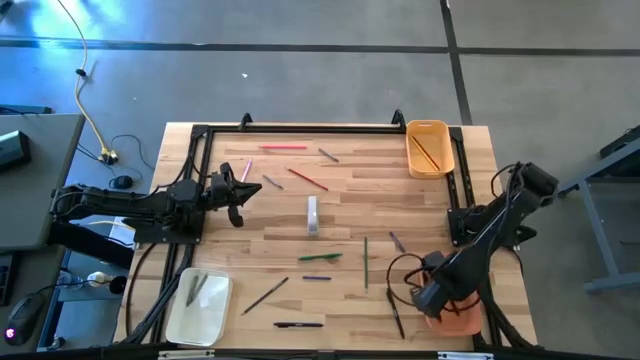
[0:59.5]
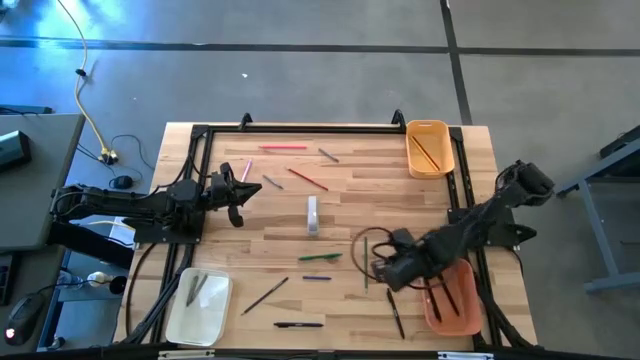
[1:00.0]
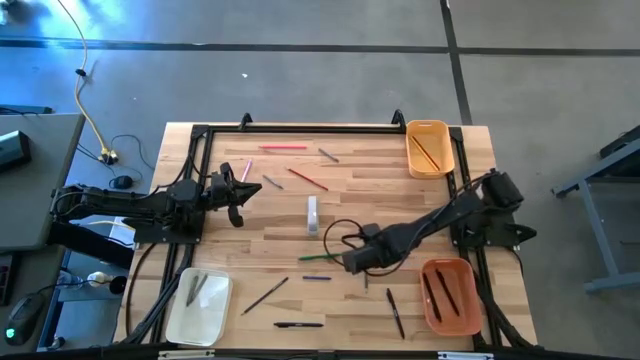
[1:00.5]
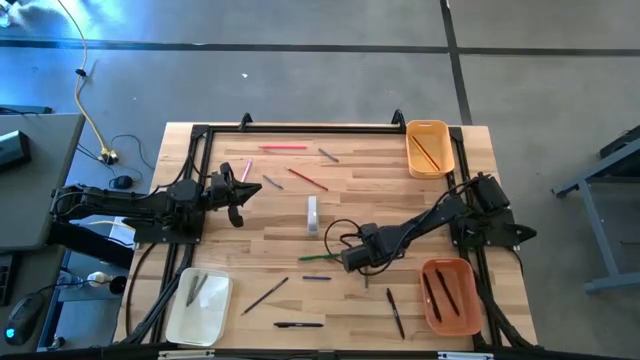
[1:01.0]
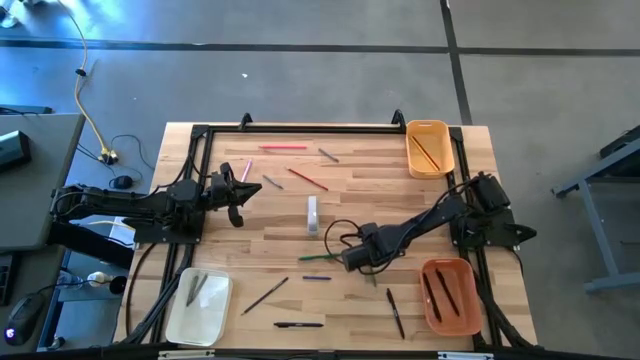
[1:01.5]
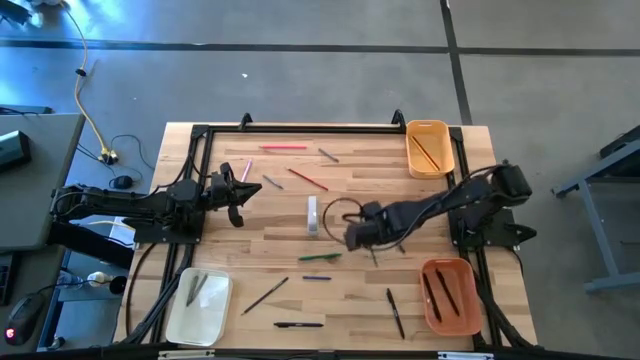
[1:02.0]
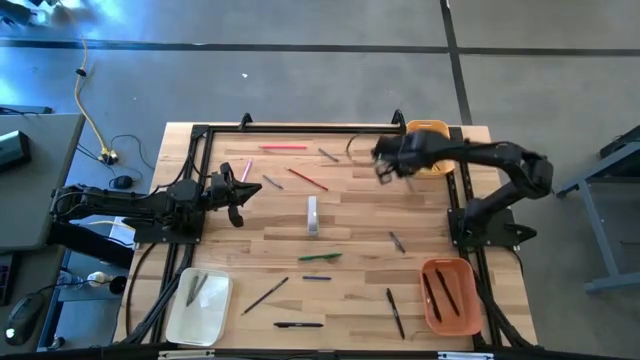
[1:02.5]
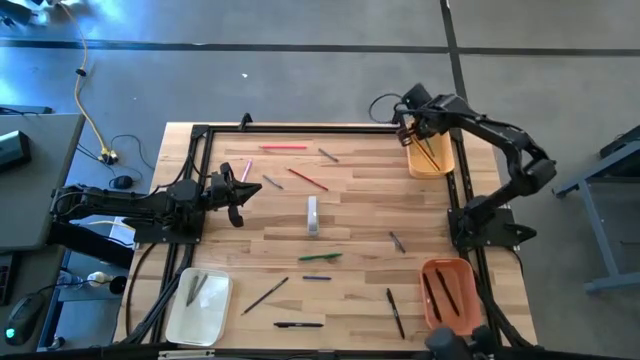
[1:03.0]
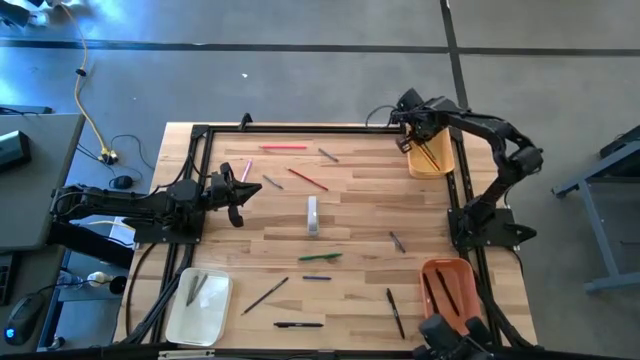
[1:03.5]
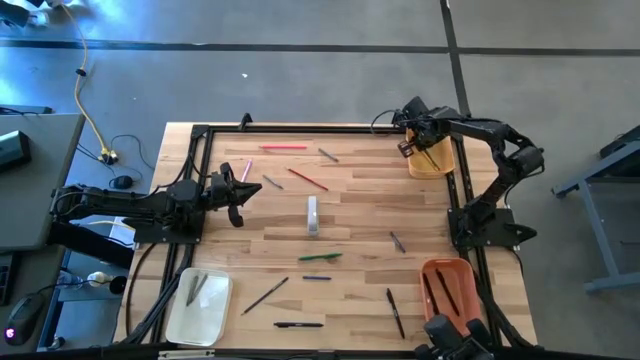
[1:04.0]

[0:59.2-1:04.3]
Task: Sort crayons/erasers/pens/pencils in bins
Put the green pencil into the yellow bin

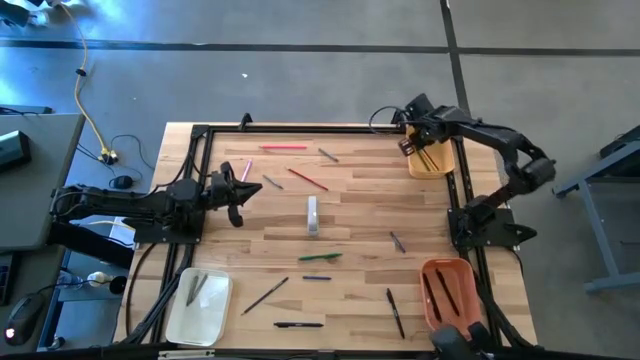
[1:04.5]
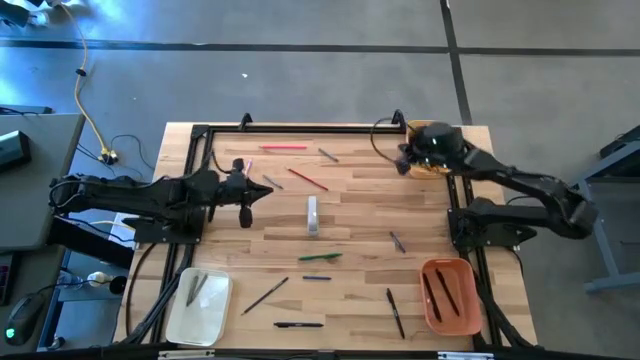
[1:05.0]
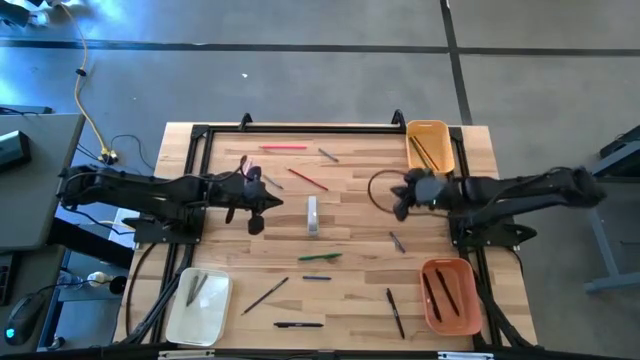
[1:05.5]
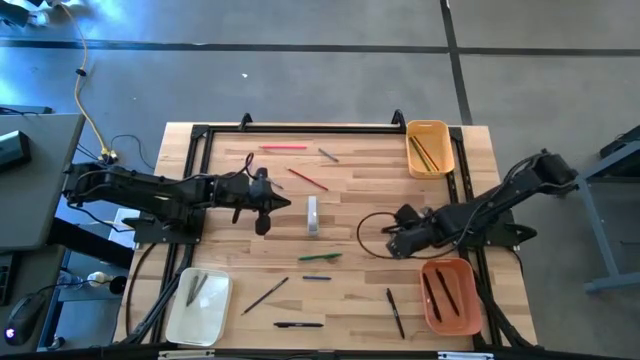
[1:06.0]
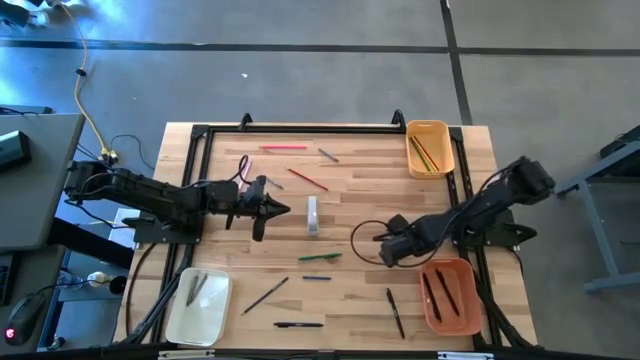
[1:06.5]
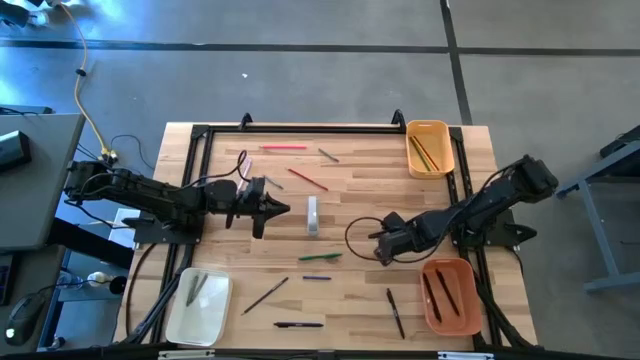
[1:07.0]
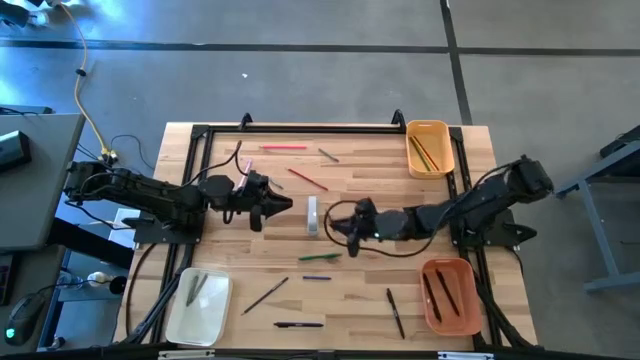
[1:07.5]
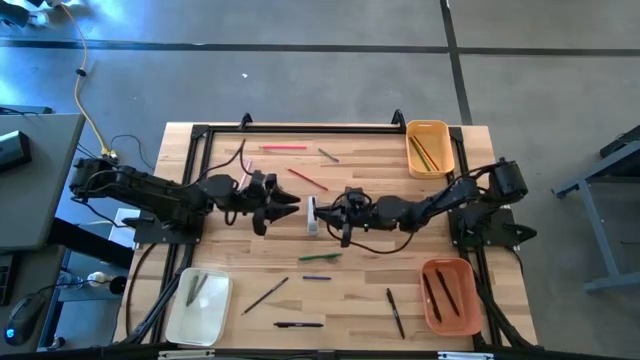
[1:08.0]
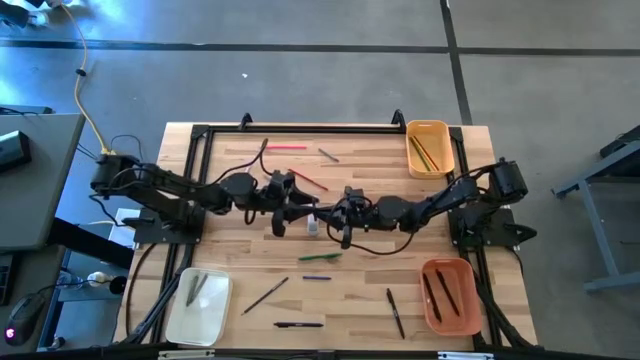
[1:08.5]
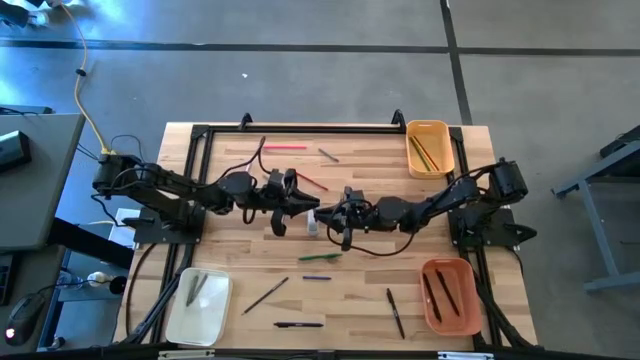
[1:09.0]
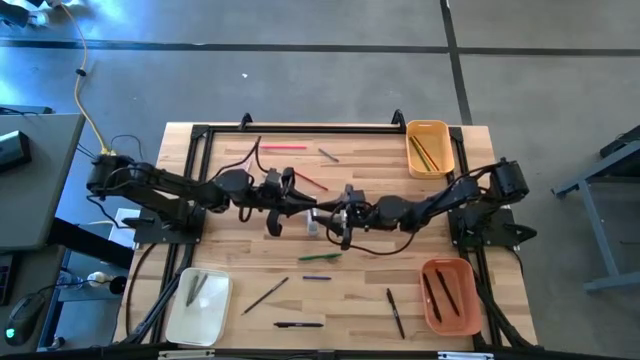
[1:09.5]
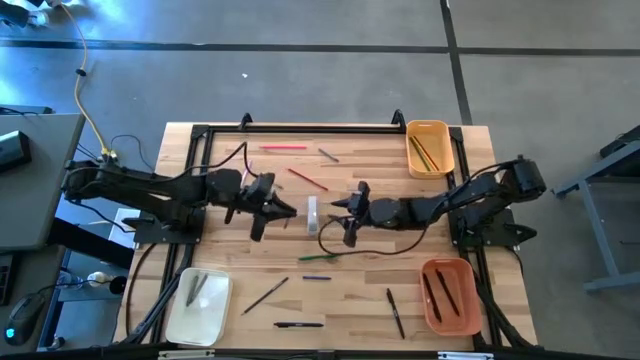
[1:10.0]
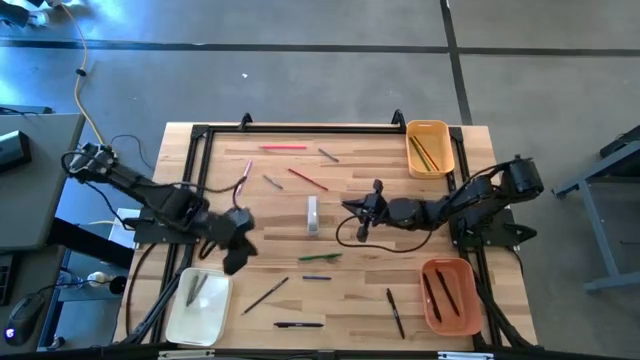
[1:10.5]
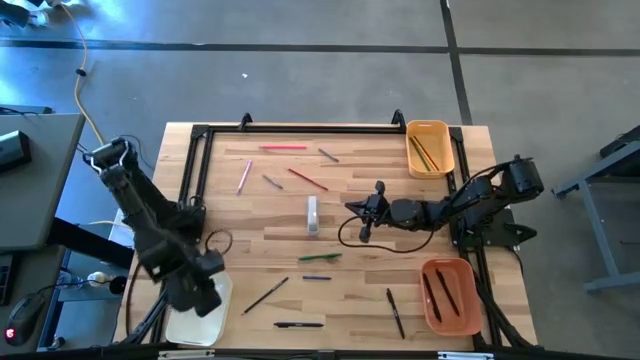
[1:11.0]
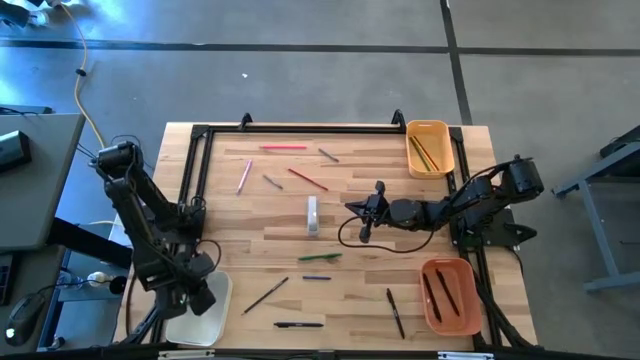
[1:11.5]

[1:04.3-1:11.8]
Put the blue crayon into the white bin

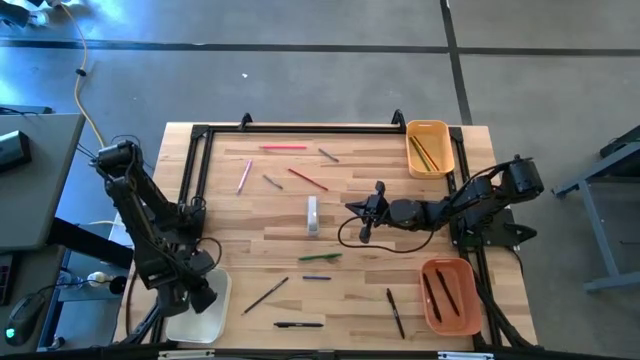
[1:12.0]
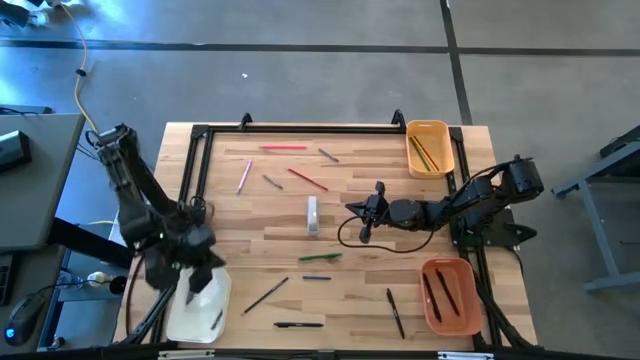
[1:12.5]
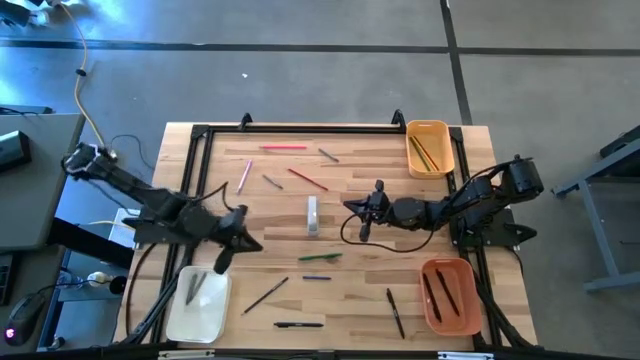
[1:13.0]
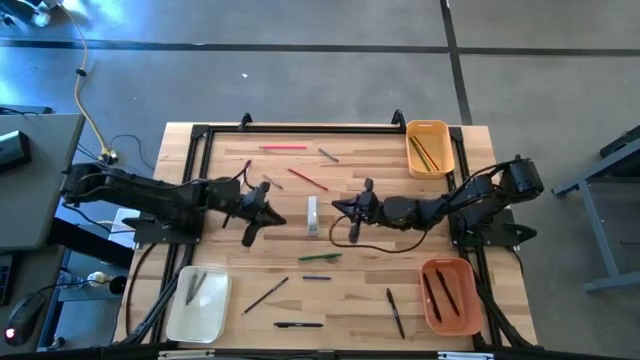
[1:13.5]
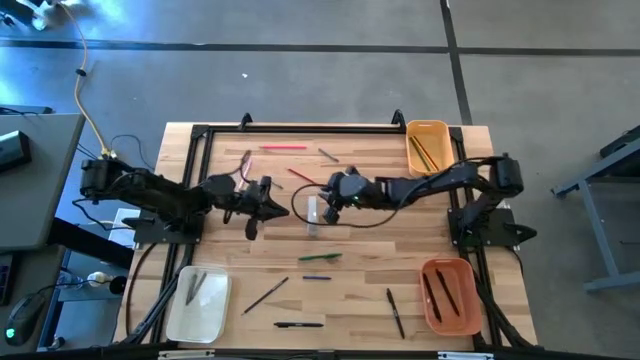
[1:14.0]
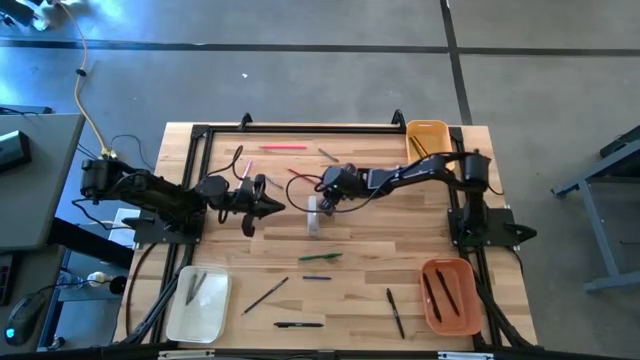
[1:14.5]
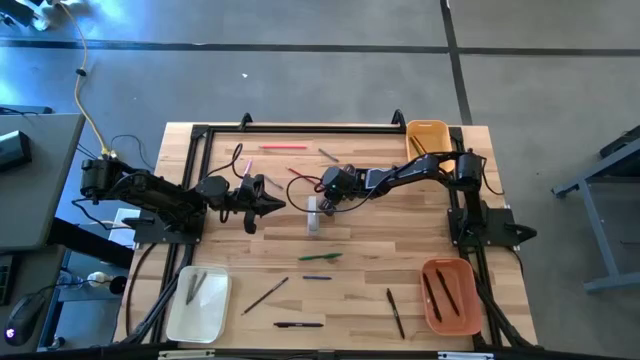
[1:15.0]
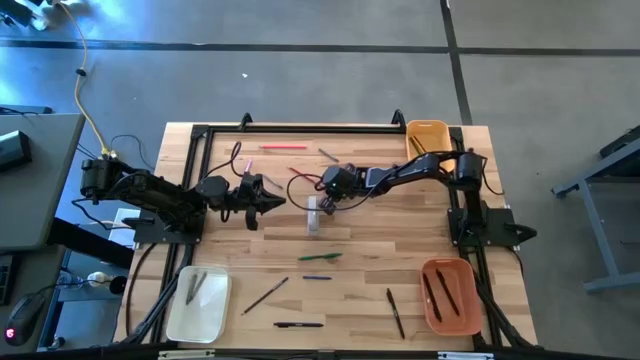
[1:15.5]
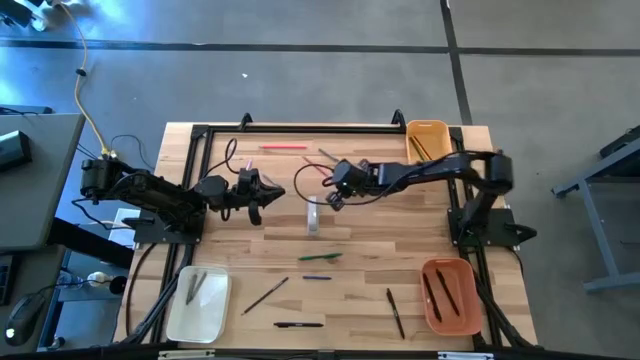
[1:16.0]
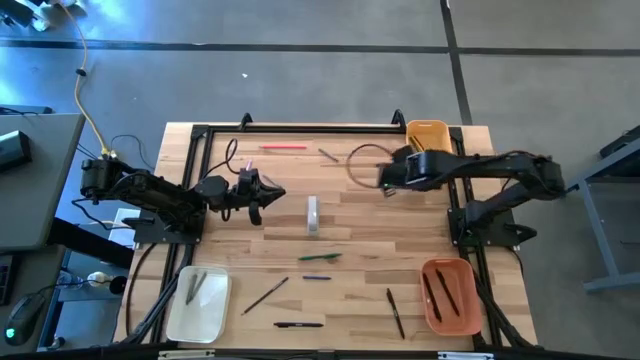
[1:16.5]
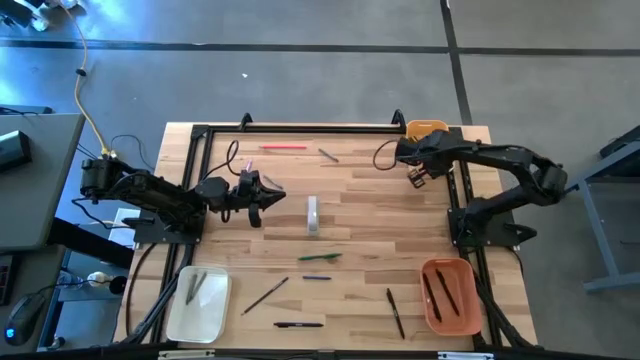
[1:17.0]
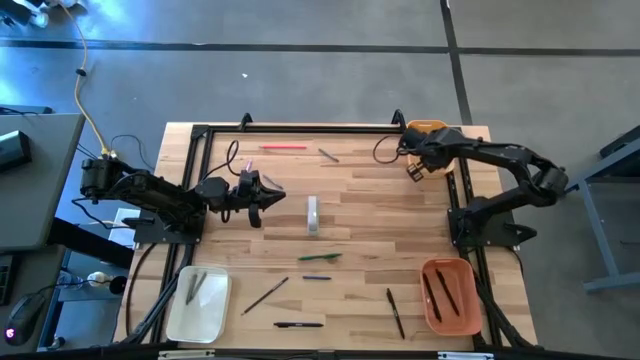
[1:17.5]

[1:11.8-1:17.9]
Put the red pencil into the yellow bin

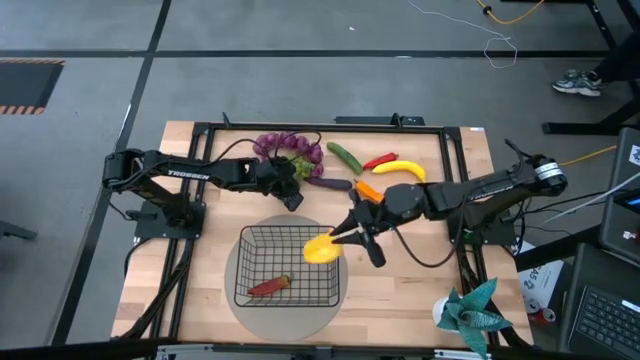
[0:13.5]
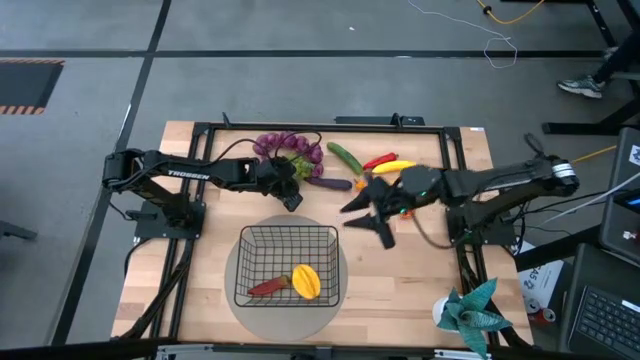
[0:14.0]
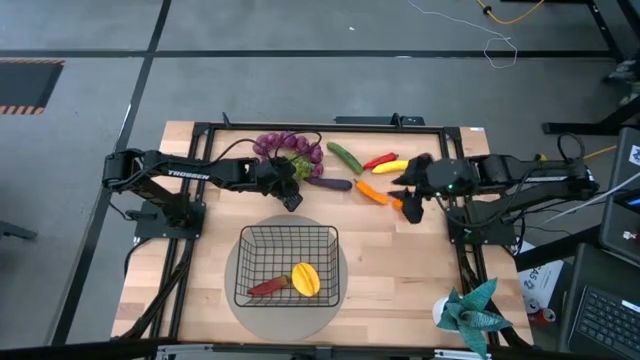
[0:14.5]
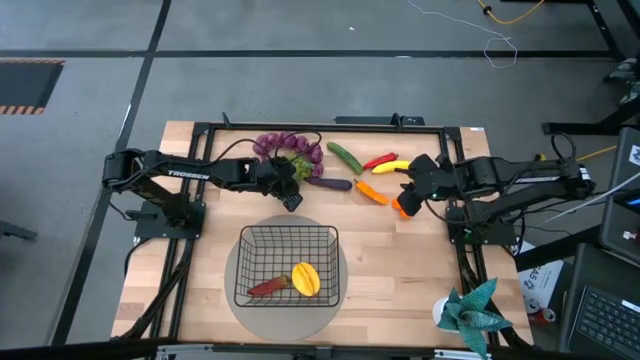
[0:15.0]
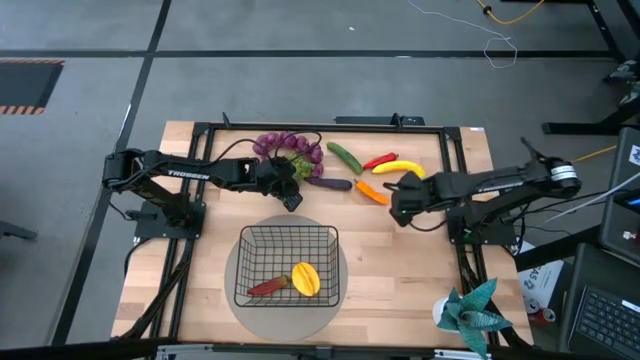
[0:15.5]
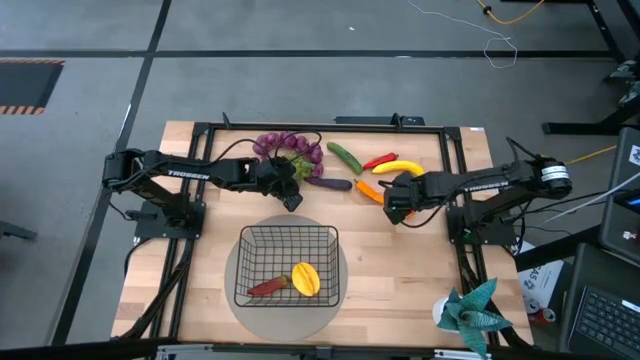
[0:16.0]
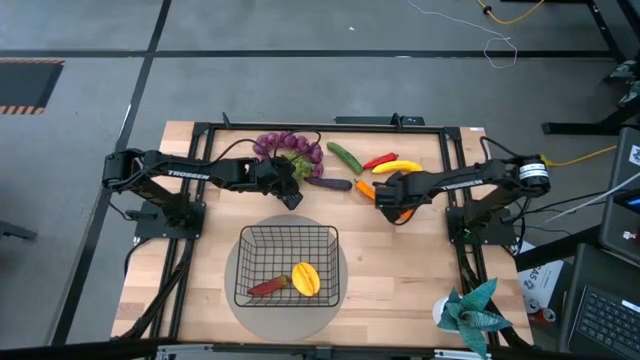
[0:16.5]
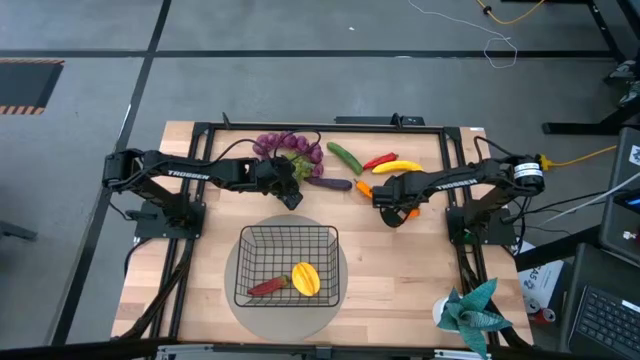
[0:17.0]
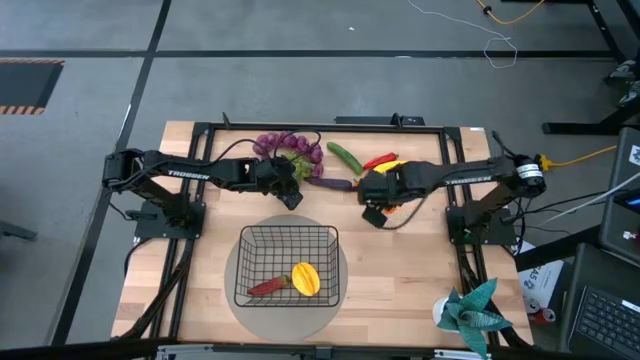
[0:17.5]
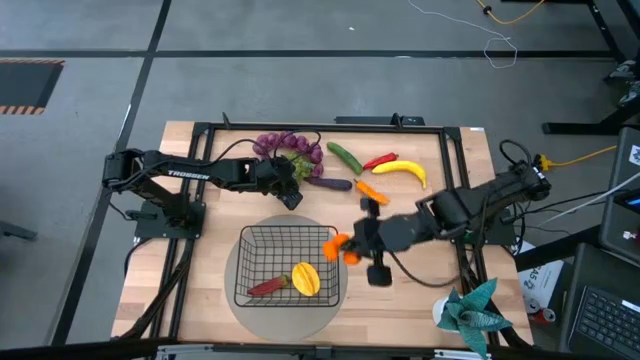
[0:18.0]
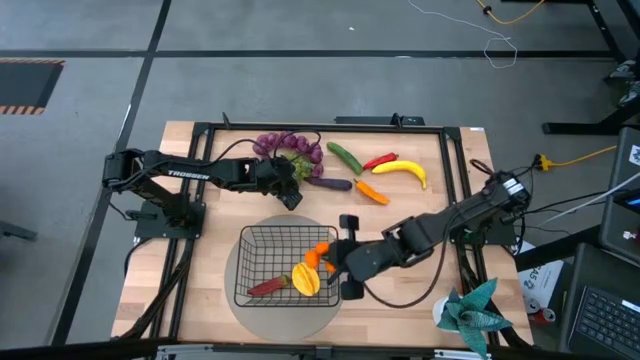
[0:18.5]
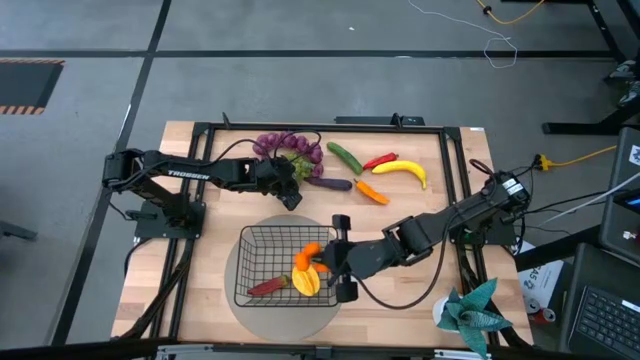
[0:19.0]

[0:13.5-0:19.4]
Task: Build produce basket
Put the tangerine into the black wire basket
